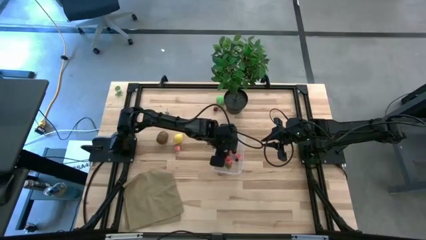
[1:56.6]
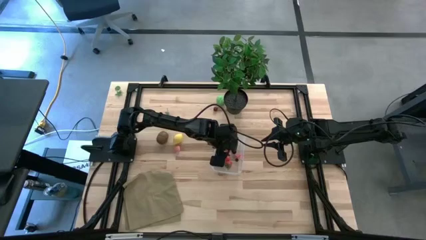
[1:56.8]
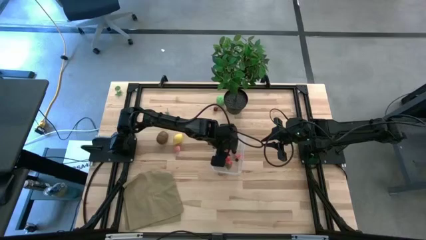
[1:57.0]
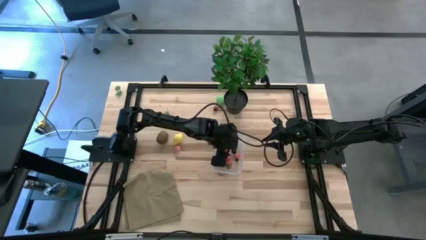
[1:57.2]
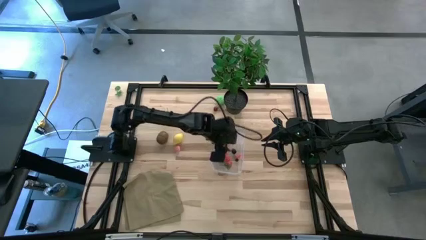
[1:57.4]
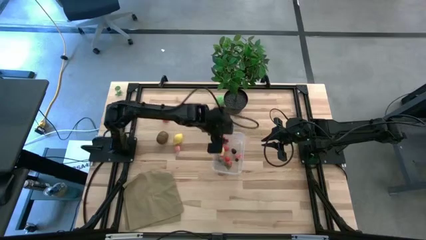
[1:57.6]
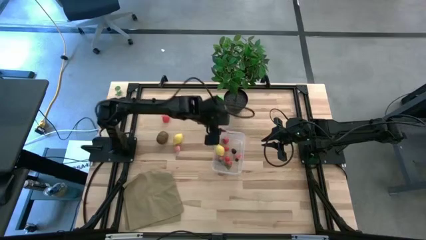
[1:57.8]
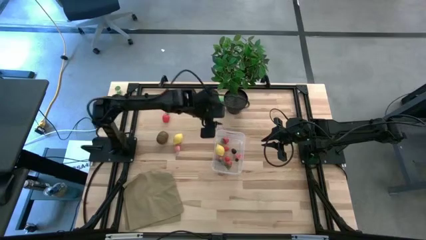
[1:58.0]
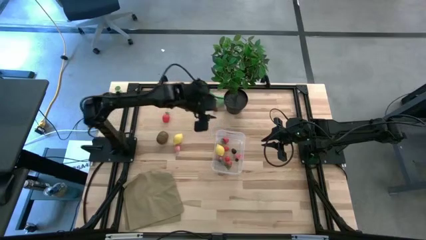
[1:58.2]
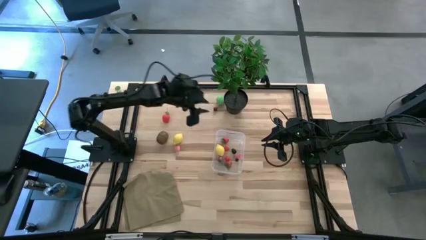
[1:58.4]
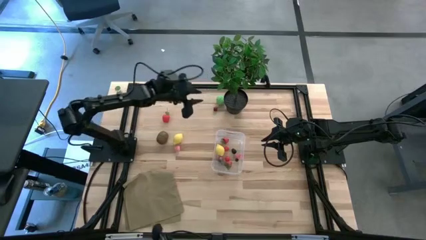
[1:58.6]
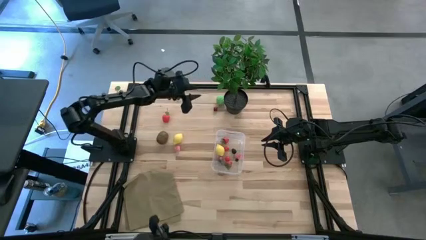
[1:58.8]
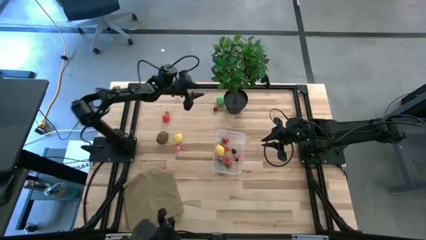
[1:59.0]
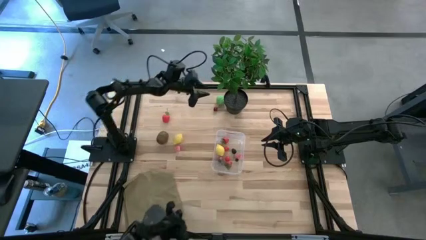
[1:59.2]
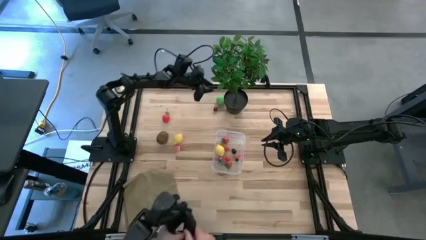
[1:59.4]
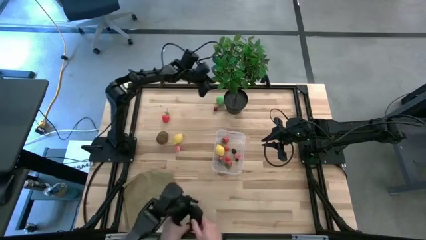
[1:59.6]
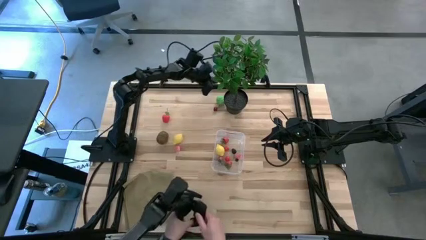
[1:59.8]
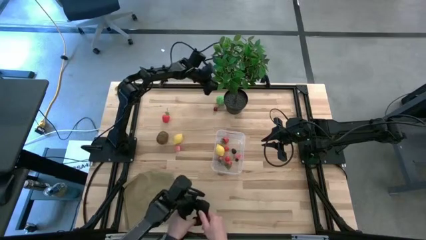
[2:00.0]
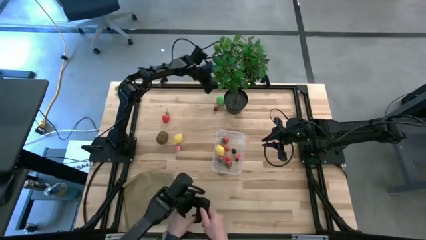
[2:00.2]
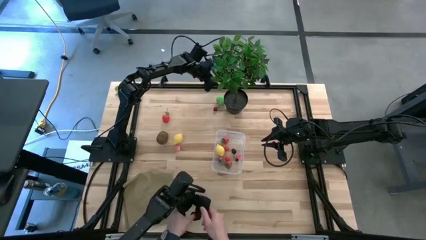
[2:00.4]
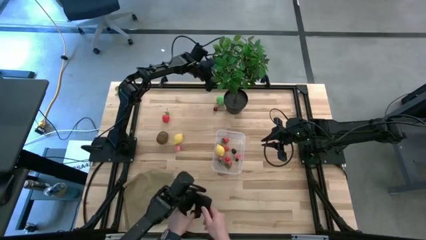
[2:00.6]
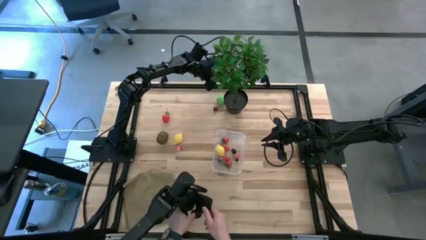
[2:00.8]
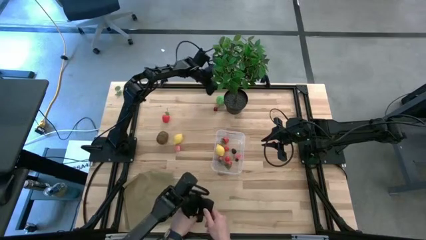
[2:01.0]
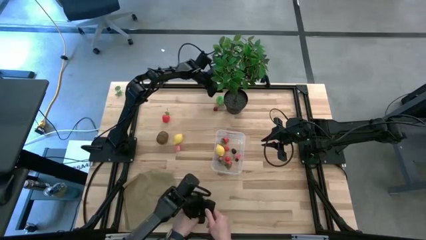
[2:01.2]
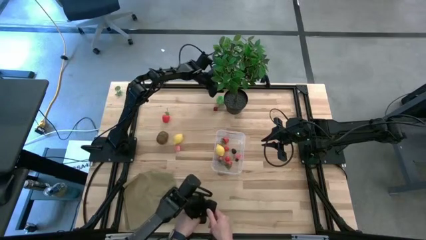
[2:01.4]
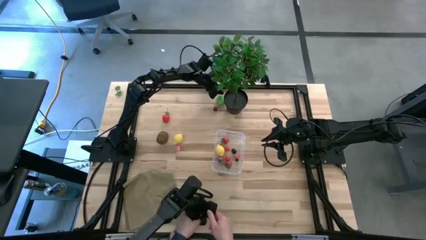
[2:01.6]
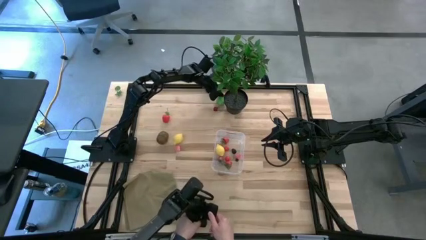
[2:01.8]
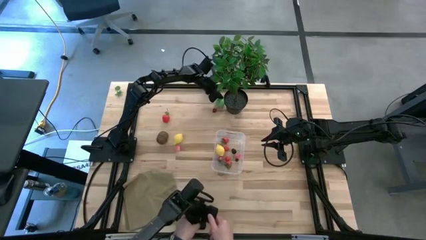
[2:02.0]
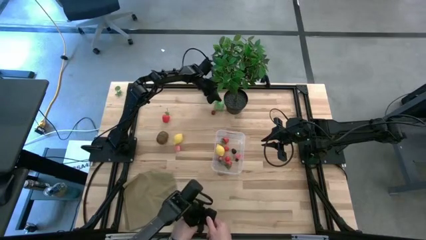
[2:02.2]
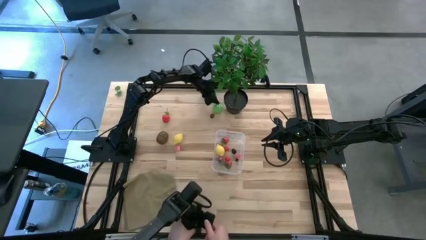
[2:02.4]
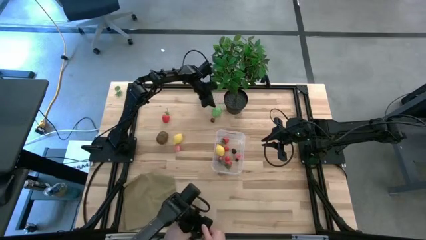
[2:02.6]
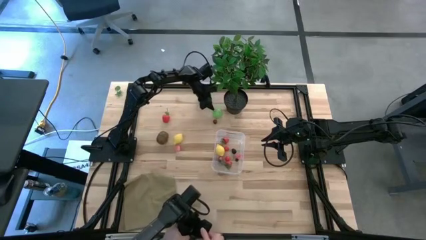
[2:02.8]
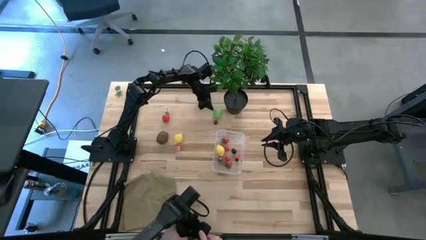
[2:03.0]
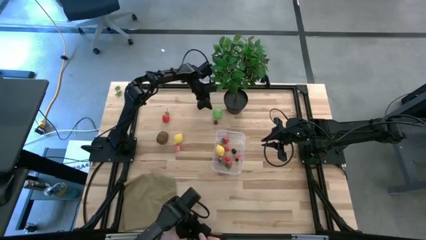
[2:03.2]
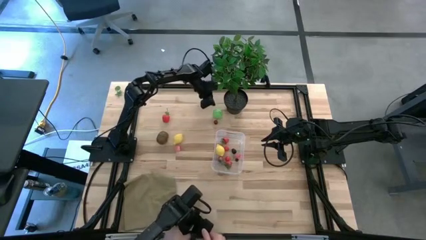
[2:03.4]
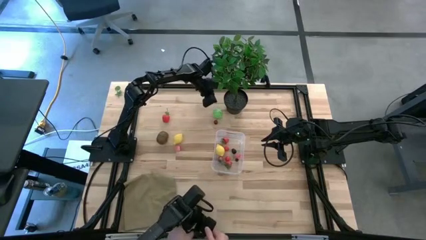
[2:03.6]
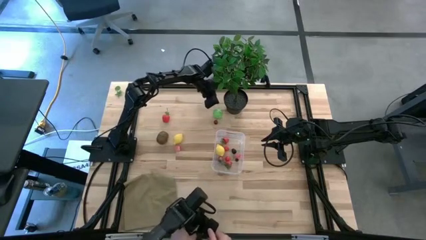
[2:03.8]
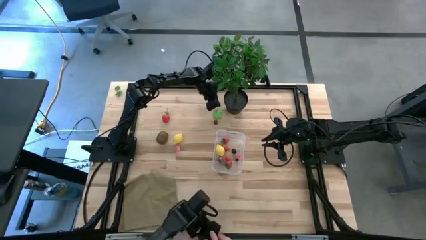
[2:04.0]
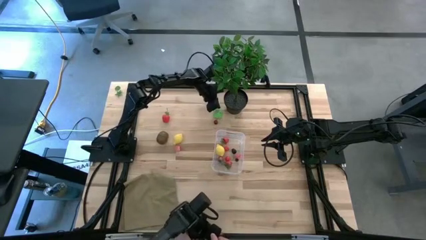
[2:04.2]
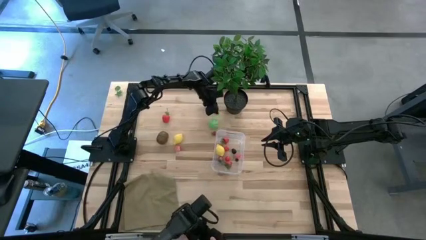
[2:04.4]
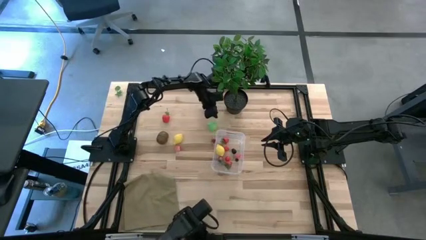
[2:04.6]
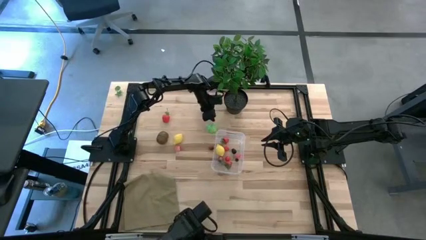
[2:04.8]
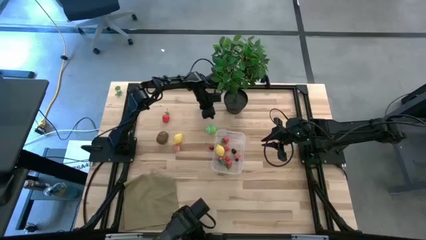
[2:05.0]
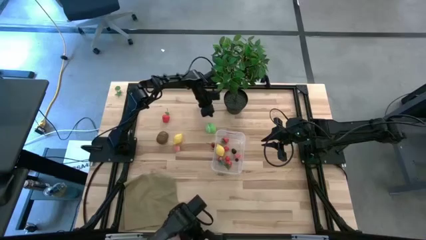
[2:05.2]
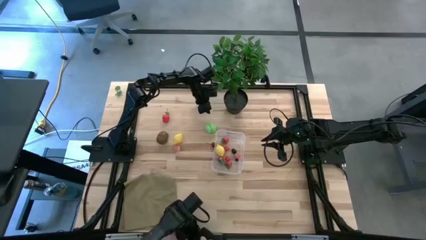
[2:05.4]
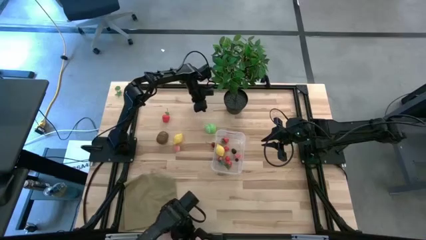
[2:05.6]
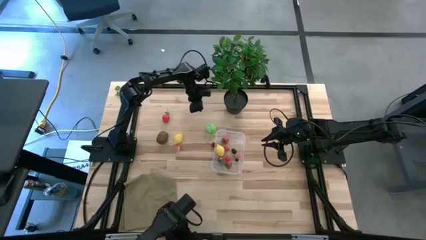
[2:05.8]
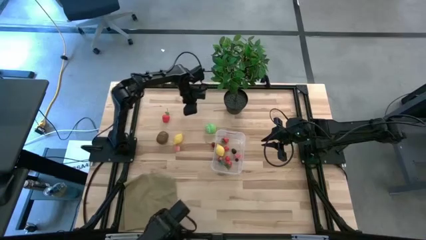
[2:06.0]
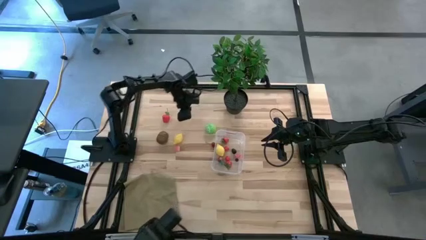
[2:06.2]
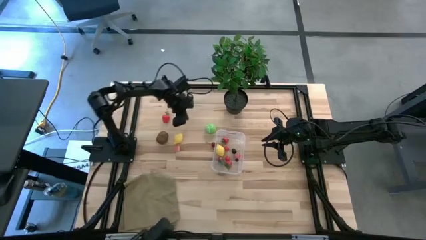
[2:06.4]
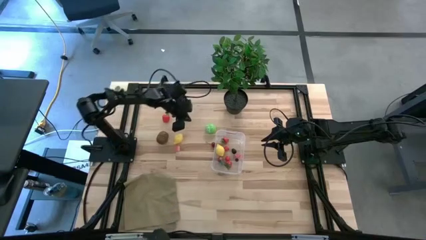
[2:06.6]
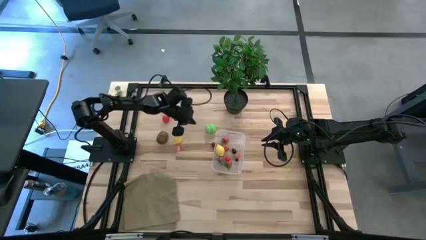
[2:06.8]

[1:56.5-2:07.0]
Task: Pick and placing Produce into tupperware
Put the green cabbage into the transparent container

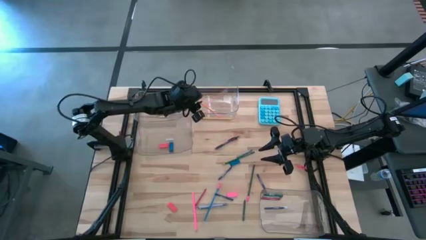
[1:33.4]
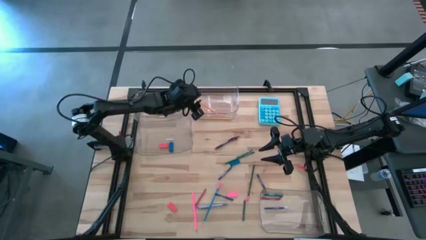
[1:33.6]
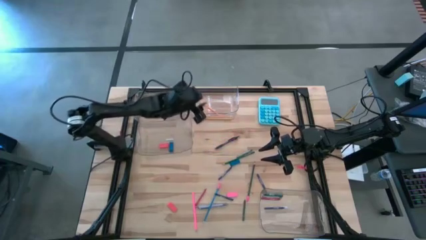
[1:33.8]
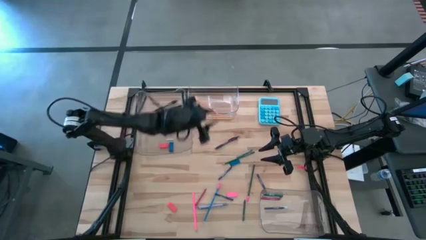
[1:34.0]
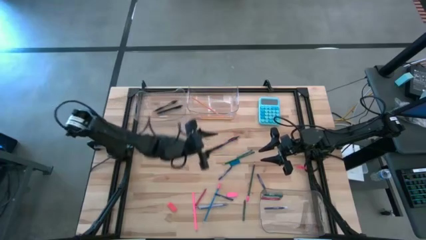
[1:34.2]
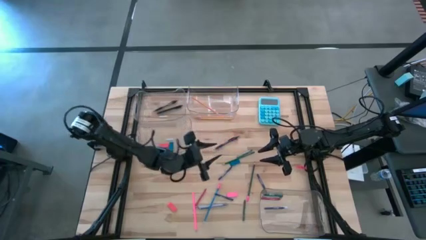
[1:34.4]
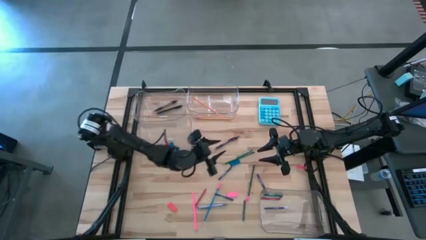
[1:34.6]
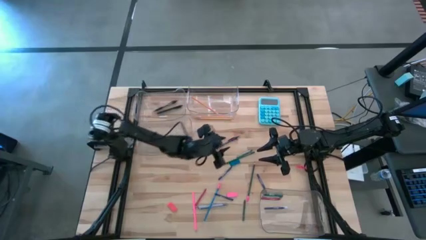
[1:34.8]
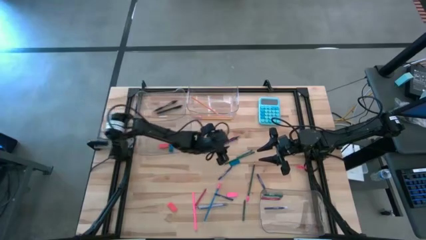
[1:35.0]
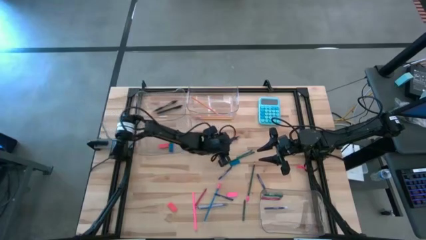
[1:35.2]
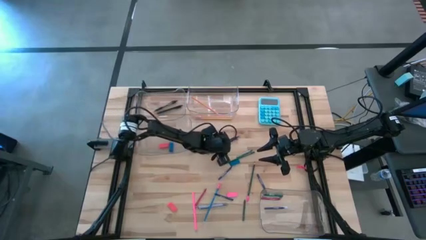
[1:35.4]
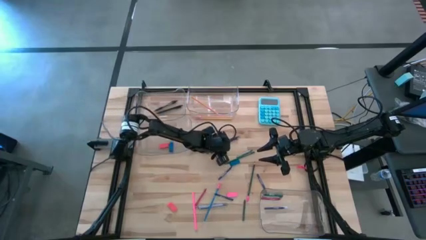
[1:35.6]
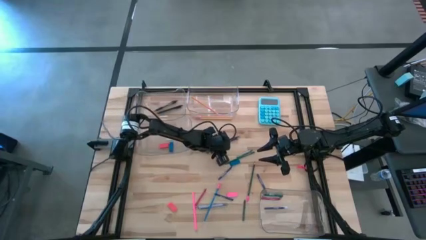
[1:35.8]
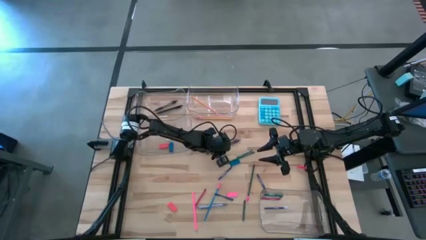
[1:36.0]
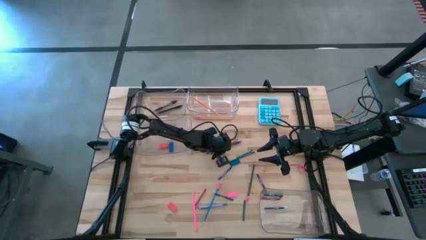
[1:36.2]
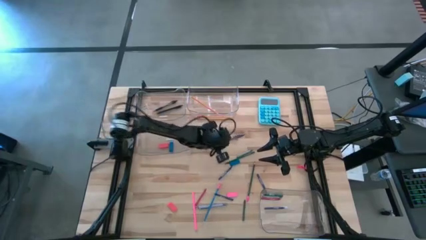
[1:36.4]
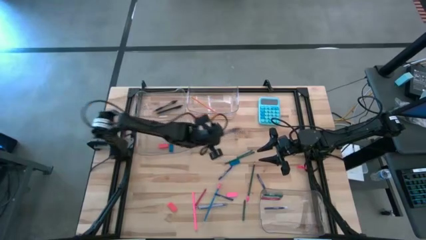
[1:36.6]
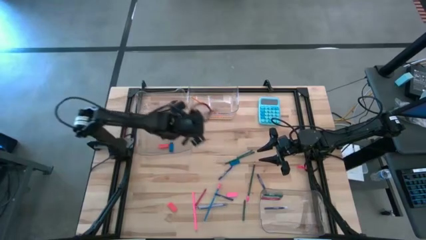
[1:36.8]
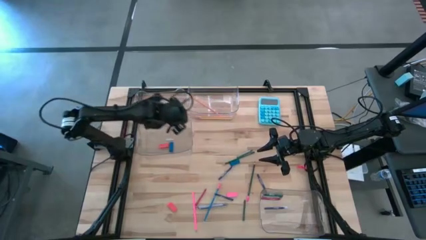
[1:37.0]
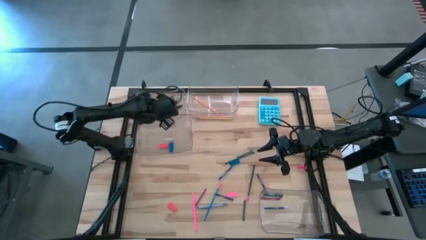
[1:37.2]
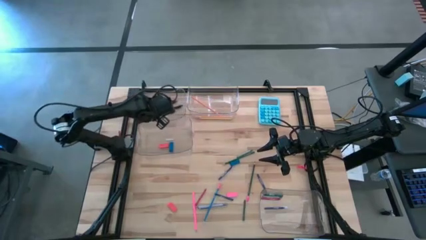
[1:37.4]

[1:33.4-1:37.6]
Task: Sort crayons/erasers/pens/pencils in bins
Put the purple pen into the top left transparent bin
